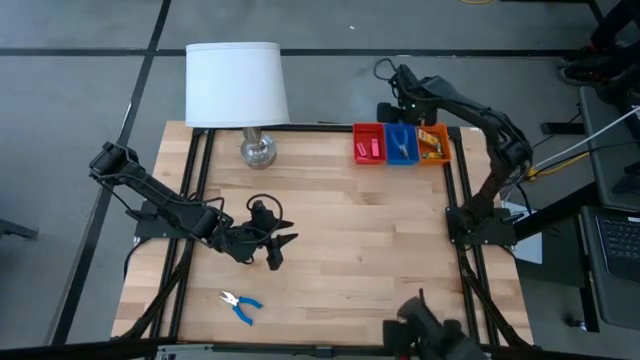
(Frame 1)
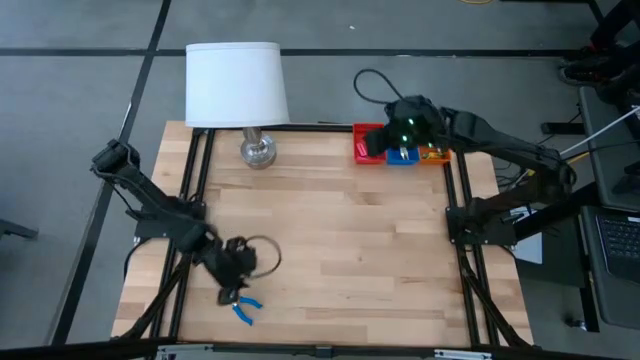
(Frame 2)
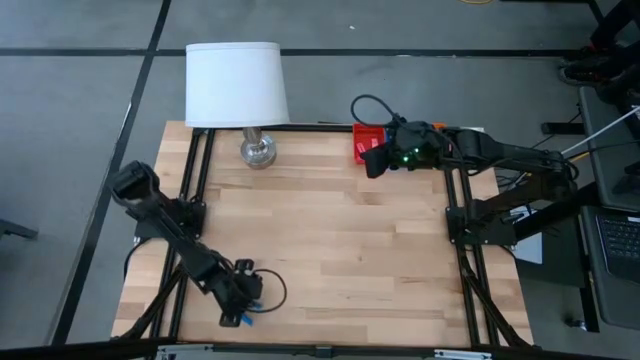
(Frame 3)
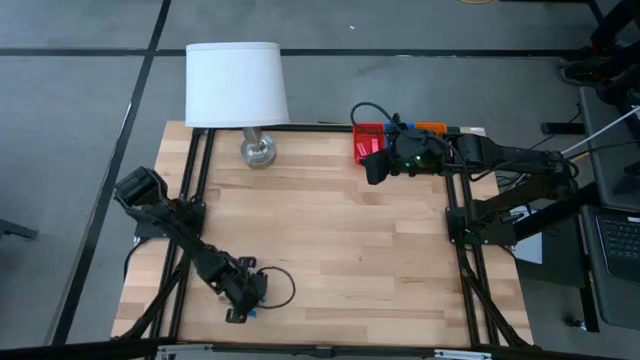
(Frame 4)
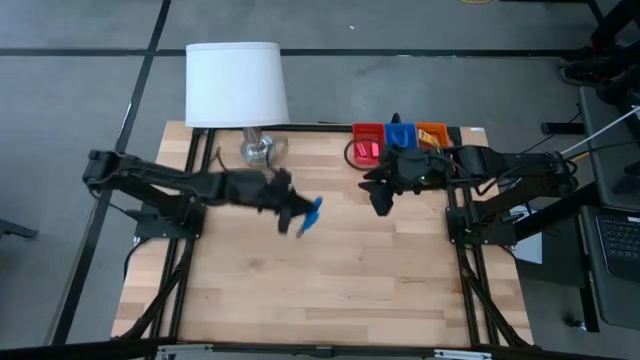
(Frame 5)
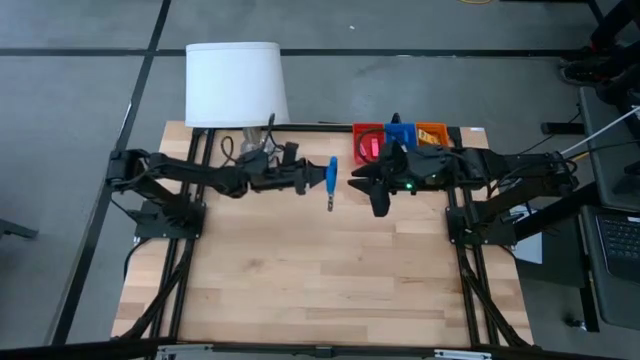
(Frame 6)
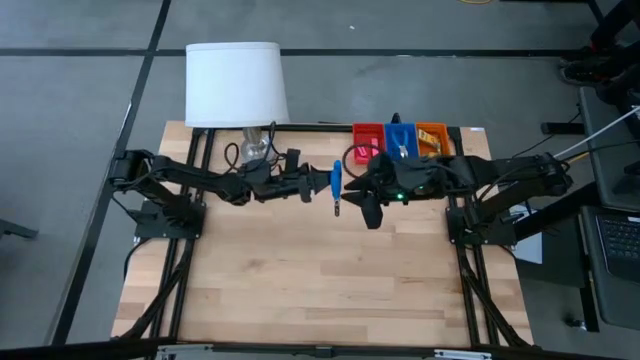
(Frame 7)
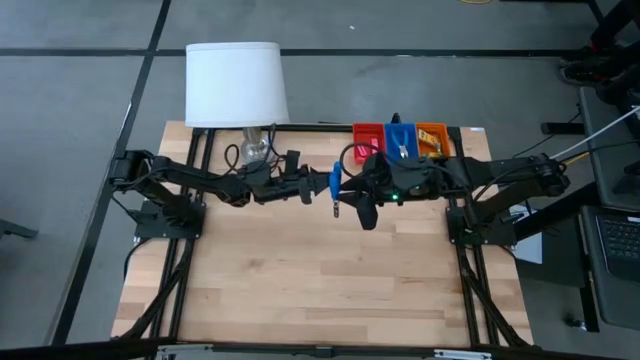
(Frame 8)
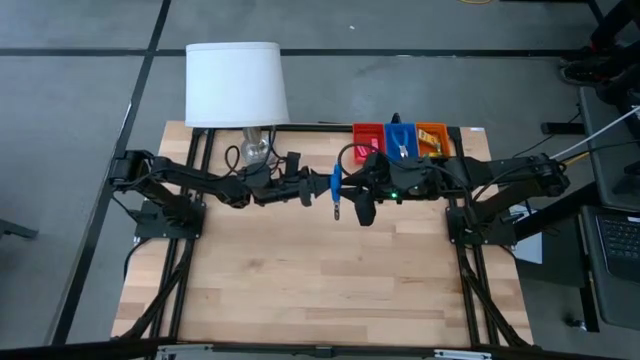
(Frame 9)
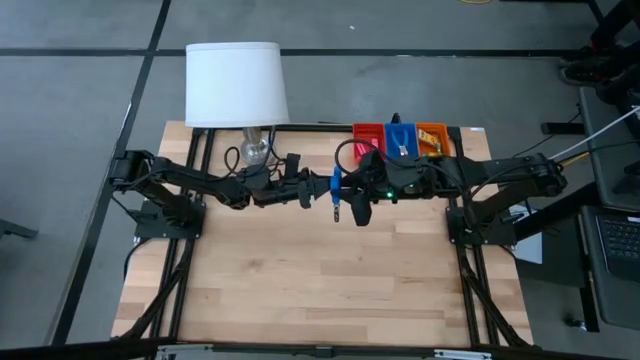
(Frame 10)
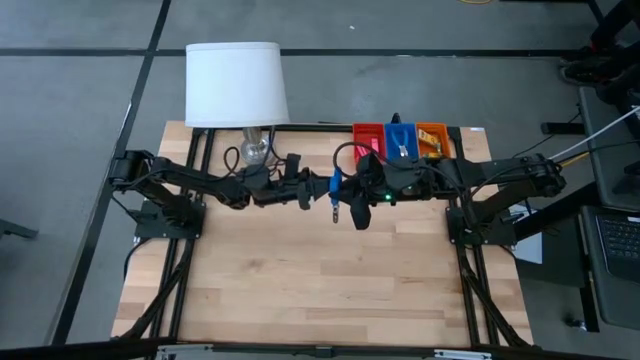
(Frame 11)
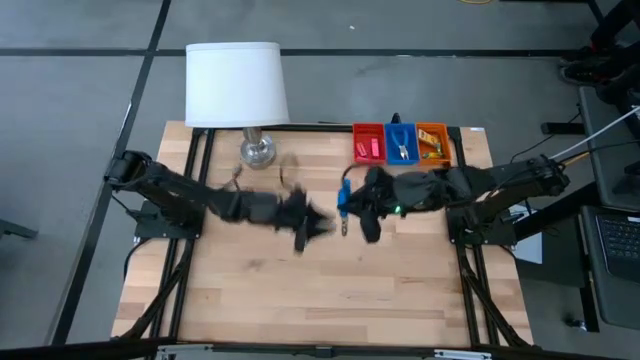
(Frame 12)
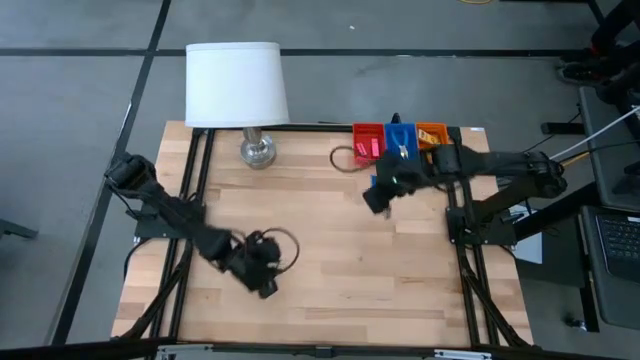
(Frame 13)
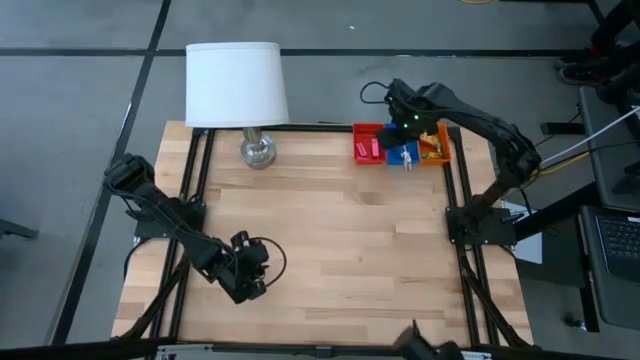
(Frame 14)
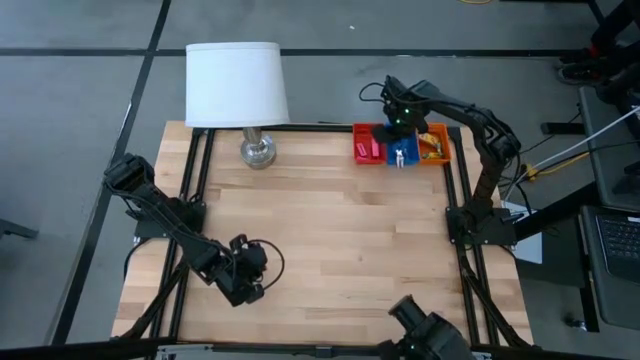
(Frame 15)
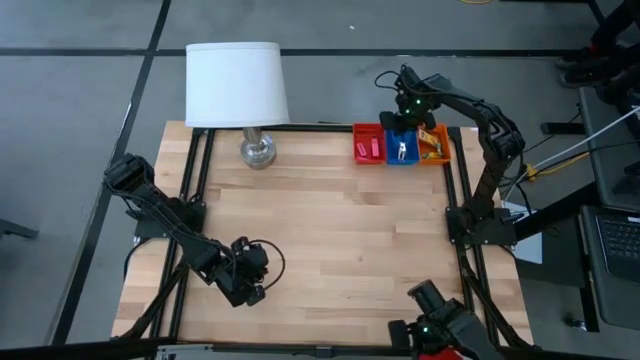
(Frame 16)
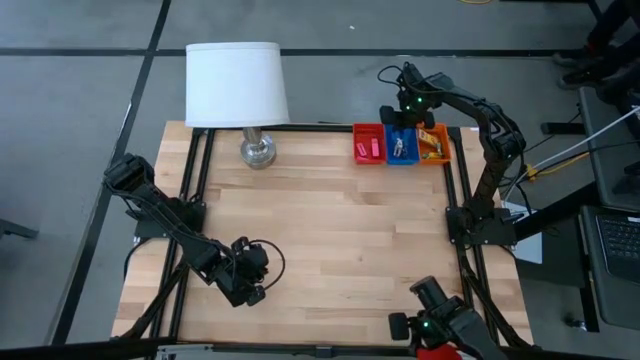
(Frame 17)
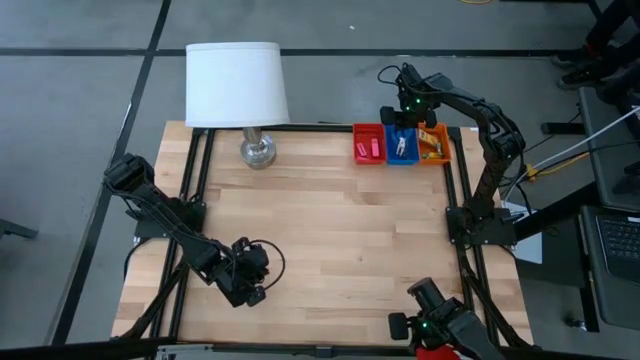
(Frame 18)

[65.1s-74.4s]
Task: Pick & Place School Supplies
Put the blue hole puncher into the blue bin

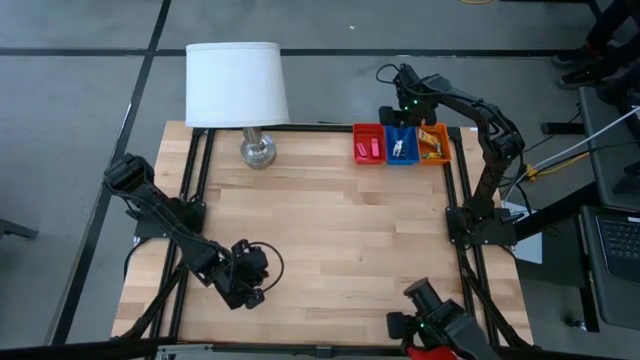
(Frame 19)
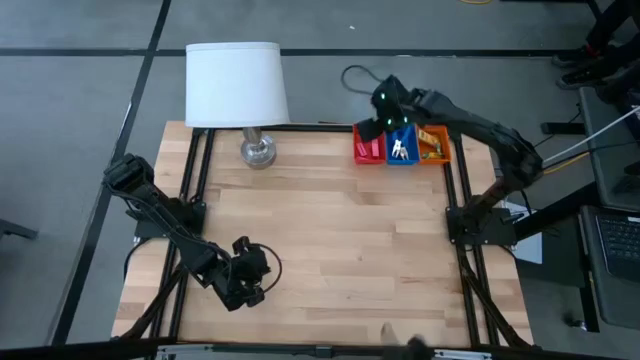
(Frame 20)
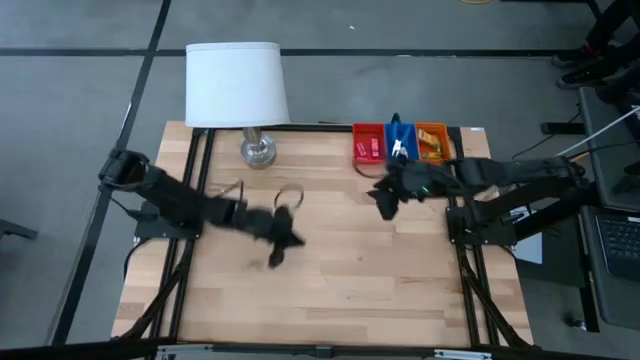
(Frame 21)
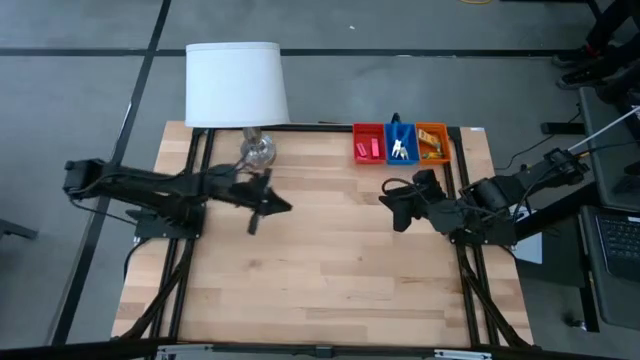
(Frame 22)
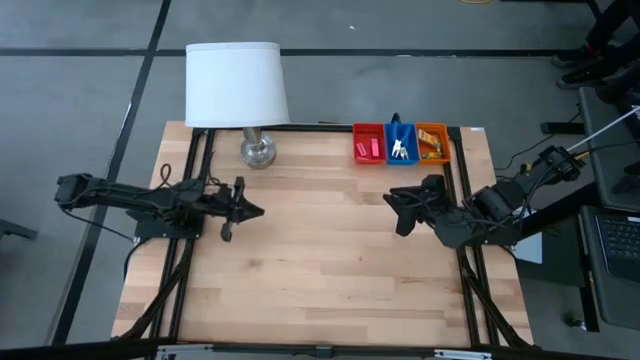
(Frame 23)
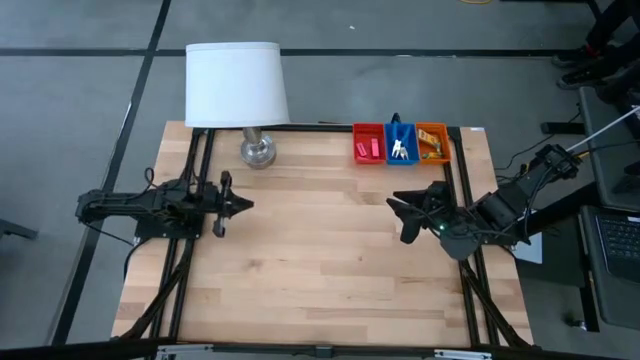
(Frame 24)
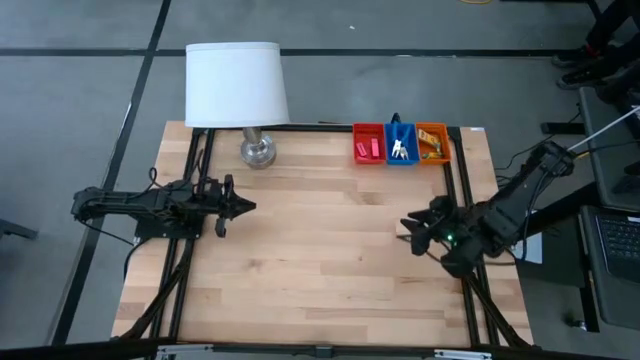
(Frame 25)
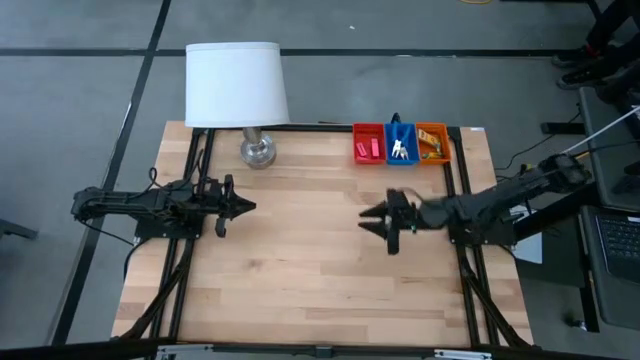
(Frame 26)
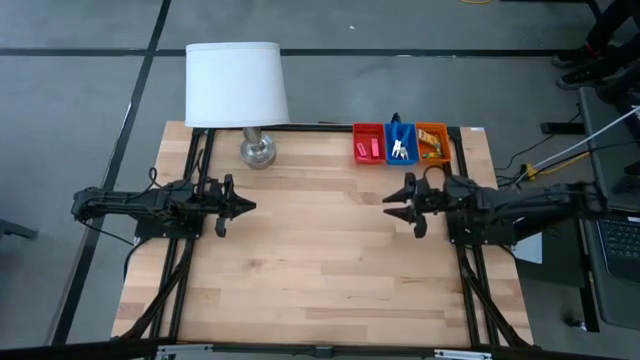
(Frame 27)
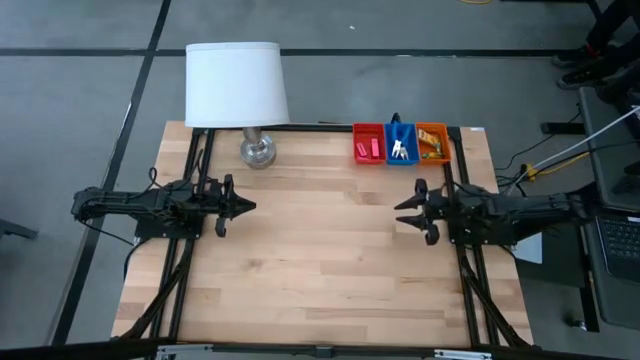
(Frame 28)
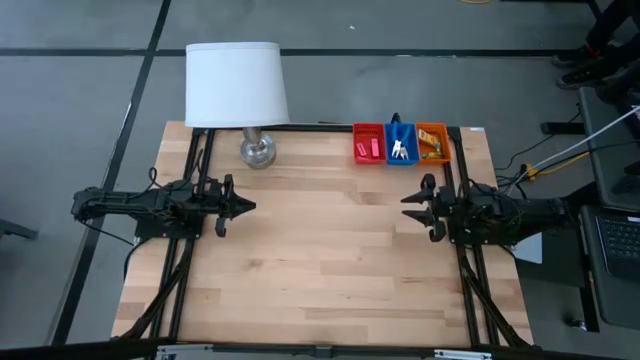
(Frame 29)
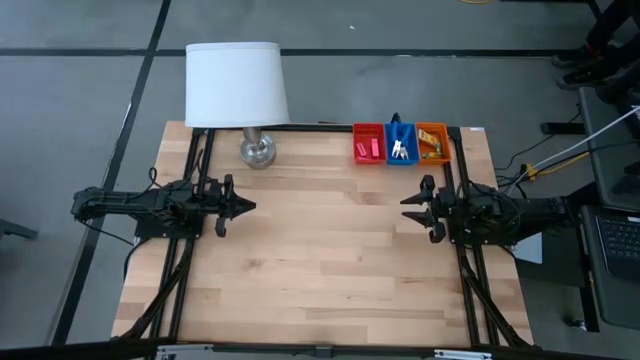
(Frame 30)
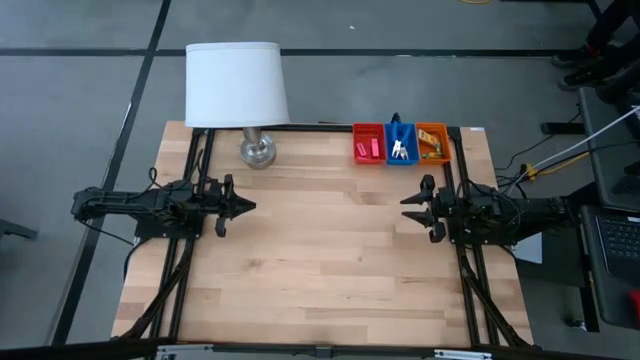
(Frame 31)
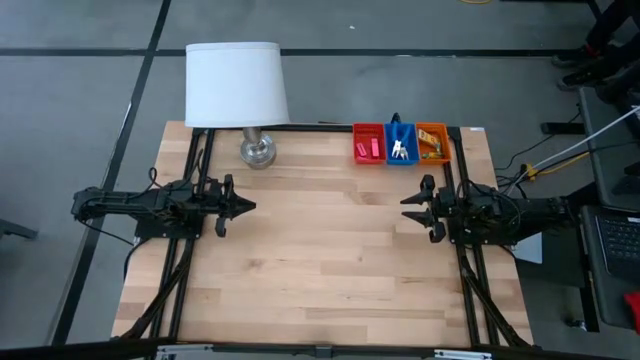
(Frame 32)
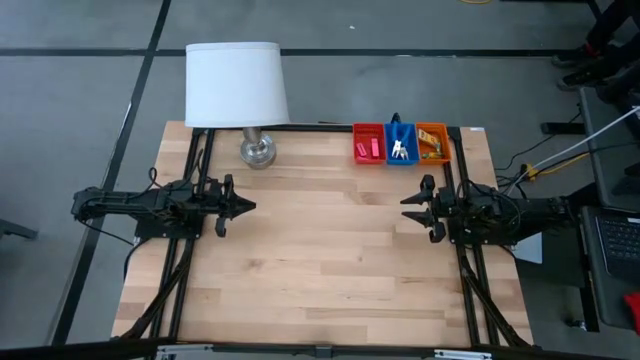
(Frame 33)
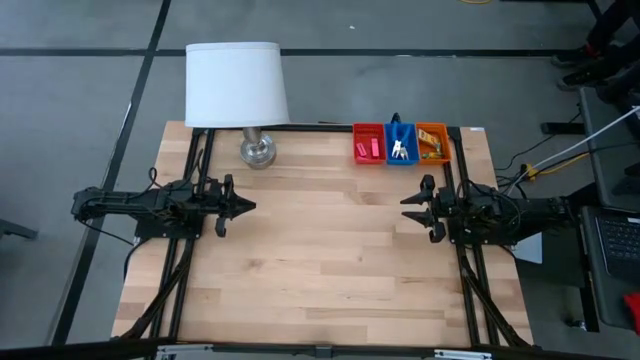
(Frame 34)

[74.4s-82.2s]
Return to home position

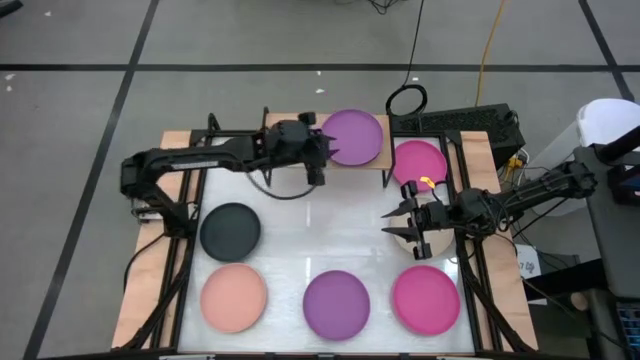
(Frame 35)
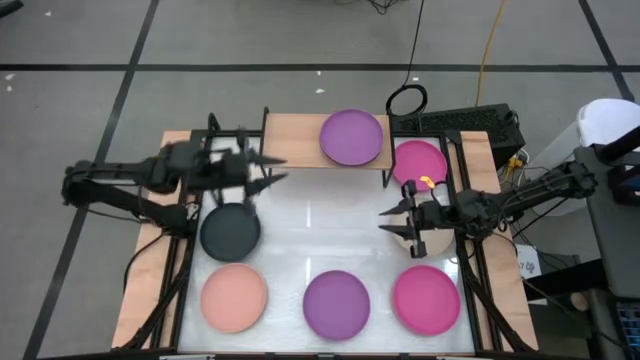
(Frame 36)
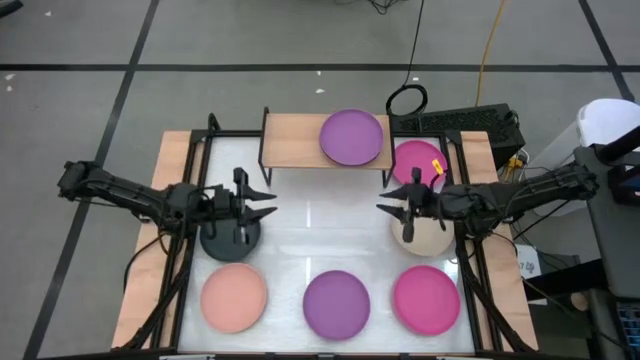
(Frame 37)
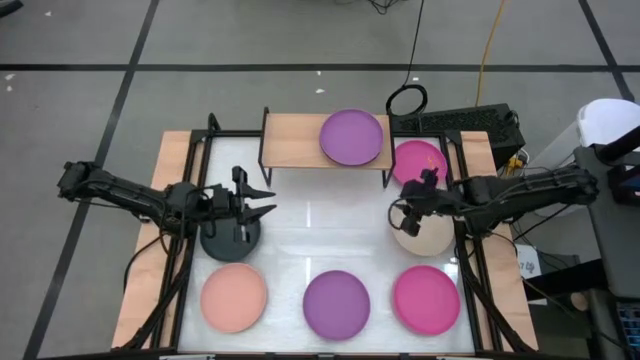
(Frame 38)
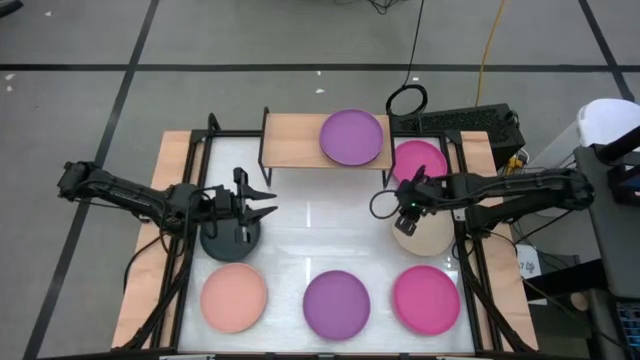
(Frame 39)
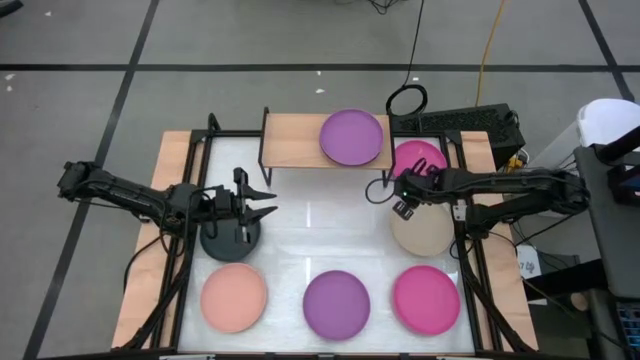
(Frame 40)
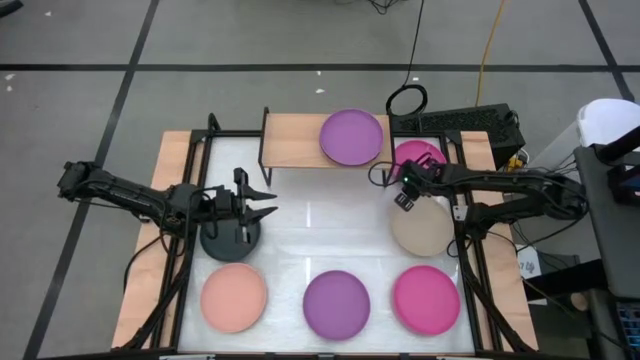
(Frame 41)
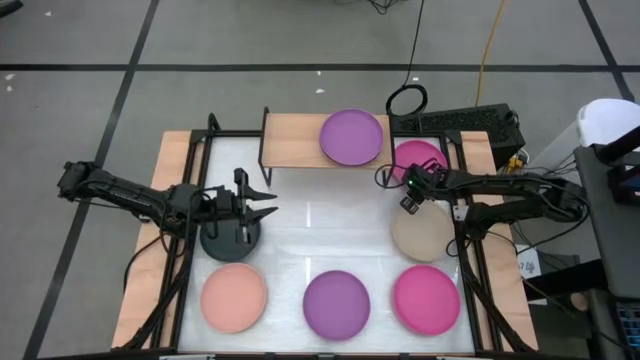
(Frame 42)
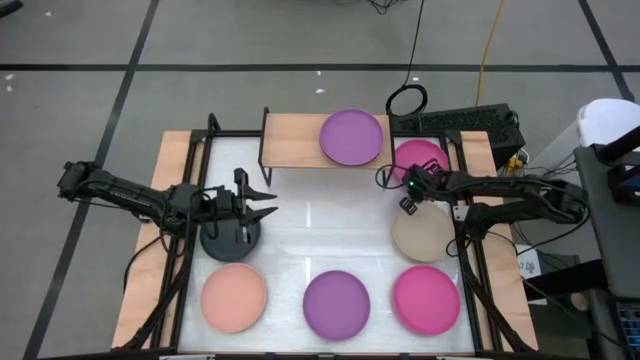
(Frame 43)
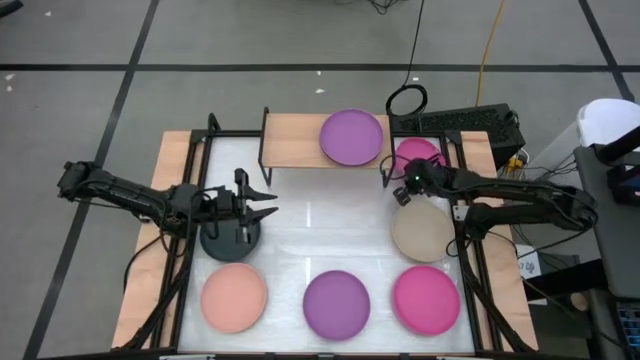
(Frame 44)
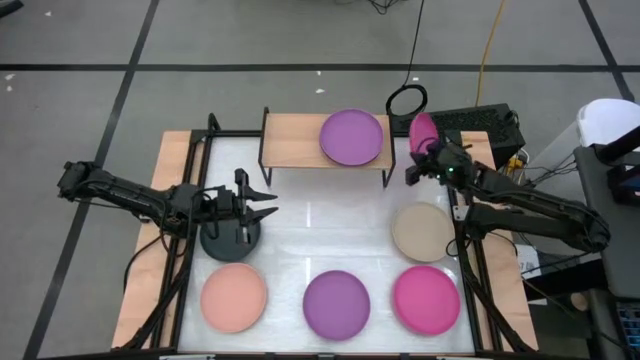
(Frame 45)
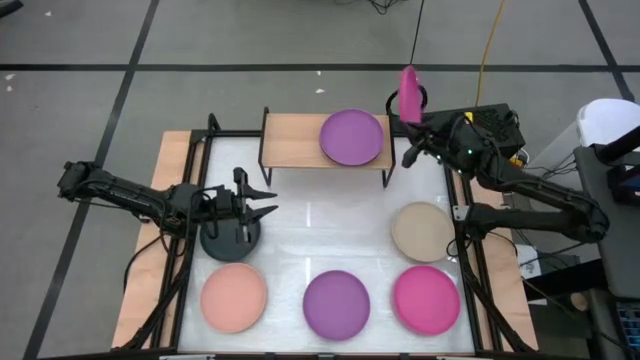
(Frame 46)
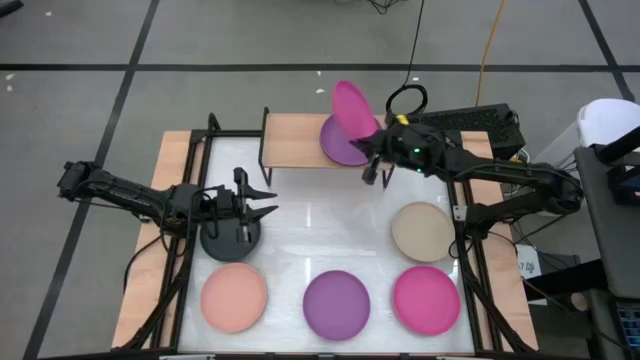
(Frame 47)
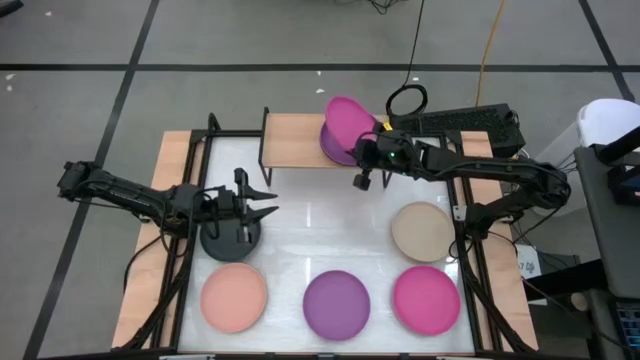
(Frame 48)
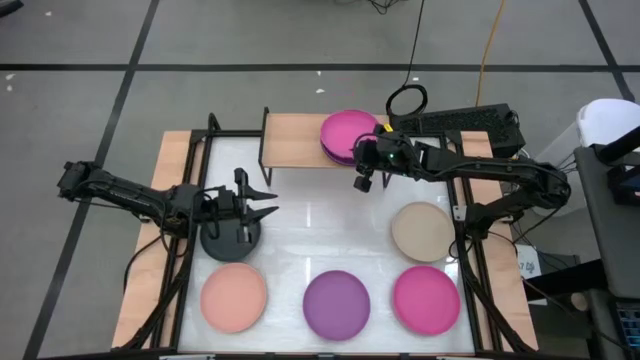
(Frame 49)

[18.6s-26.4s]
Task: Place and stack plates onto a shelf
Stack the top pink plate on top of the violet plate on the shelf
